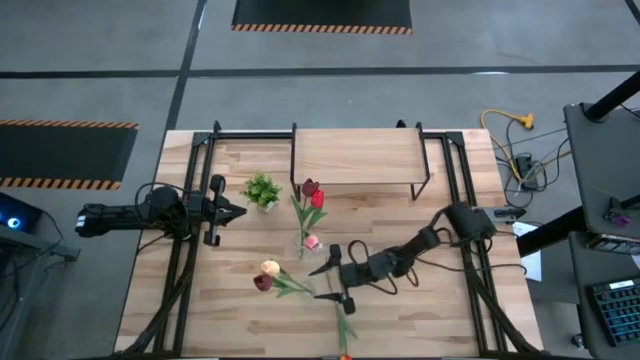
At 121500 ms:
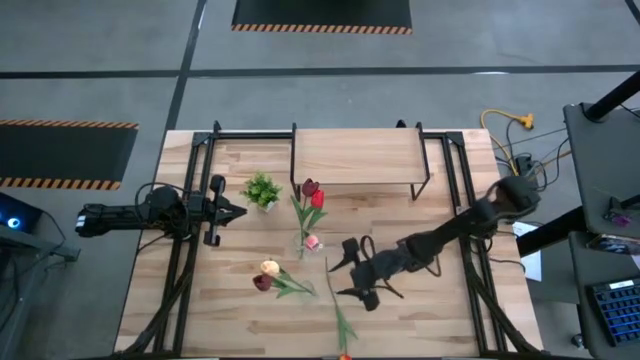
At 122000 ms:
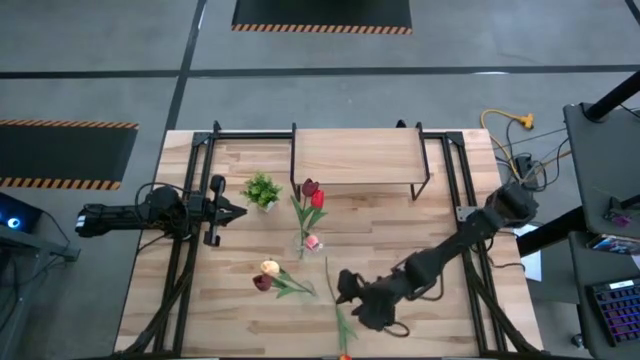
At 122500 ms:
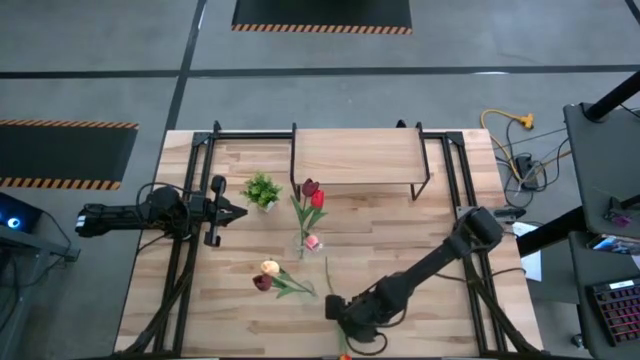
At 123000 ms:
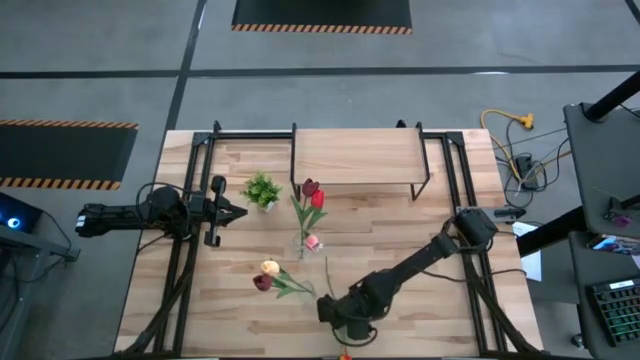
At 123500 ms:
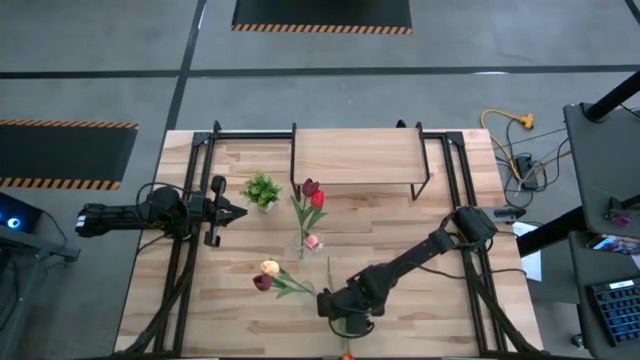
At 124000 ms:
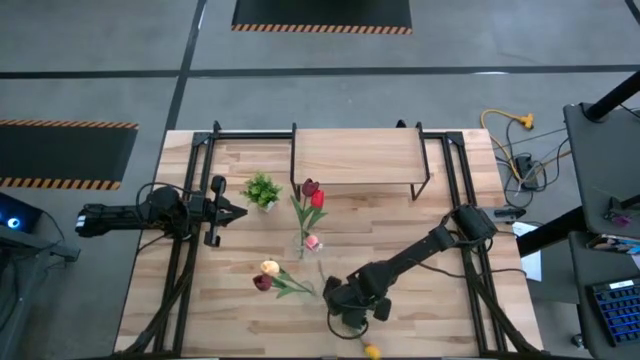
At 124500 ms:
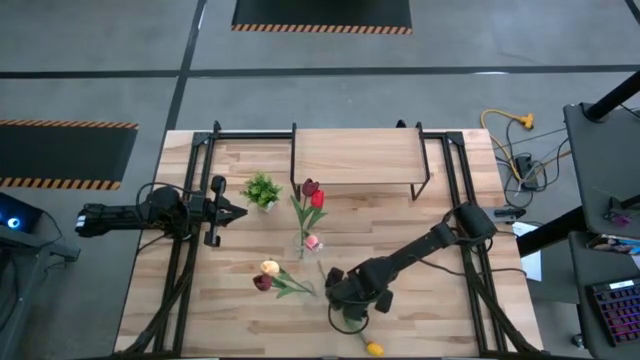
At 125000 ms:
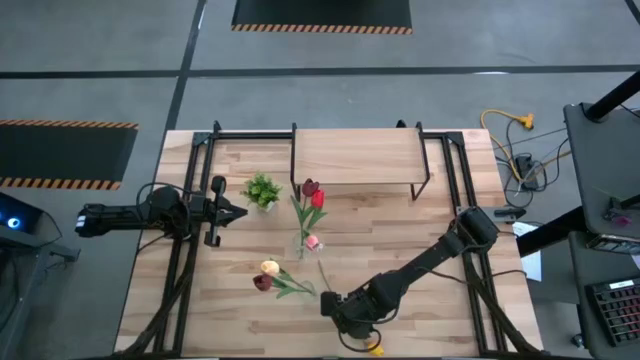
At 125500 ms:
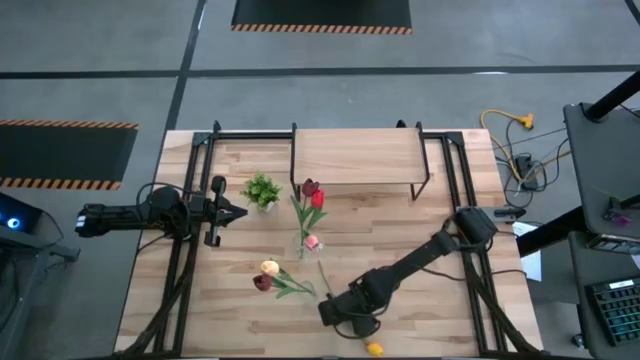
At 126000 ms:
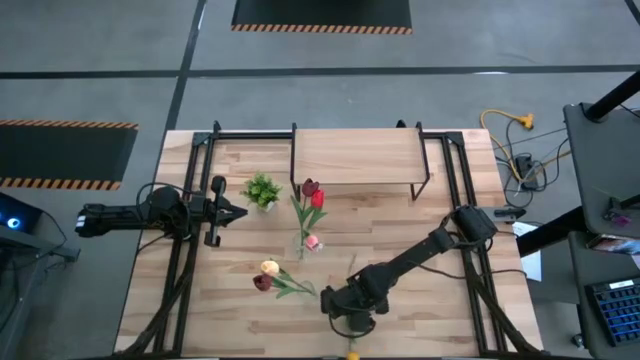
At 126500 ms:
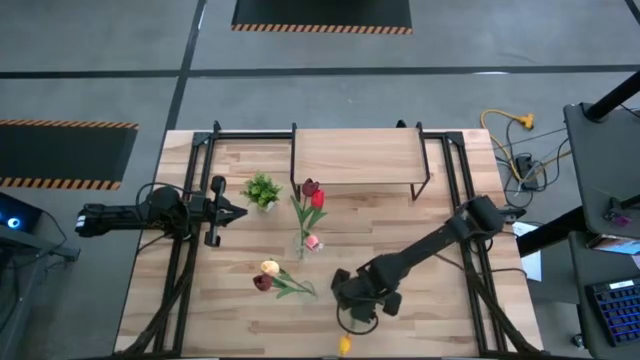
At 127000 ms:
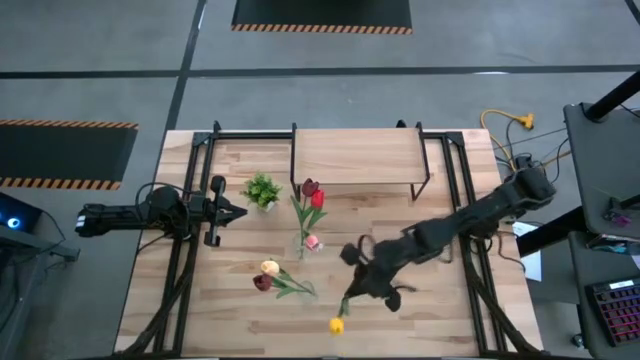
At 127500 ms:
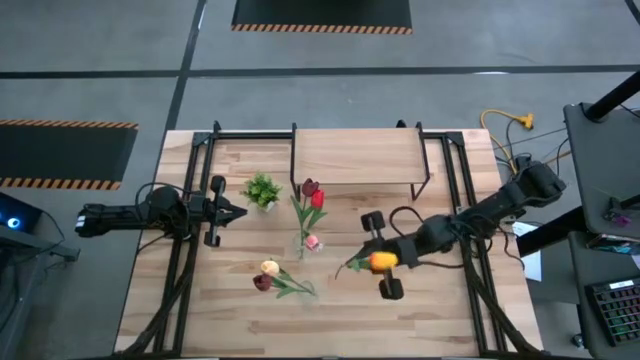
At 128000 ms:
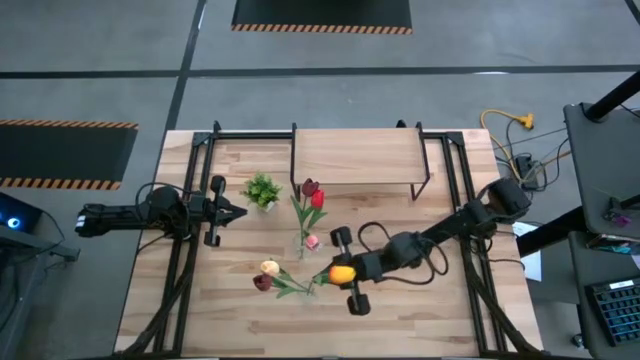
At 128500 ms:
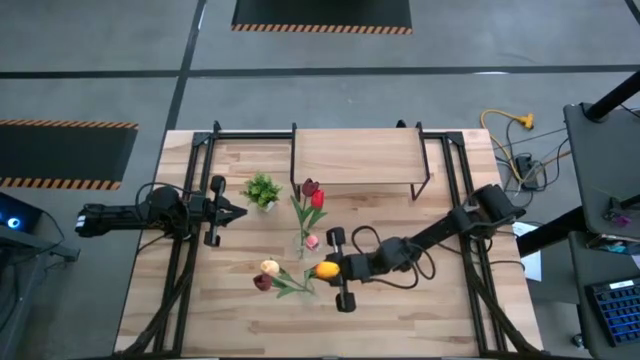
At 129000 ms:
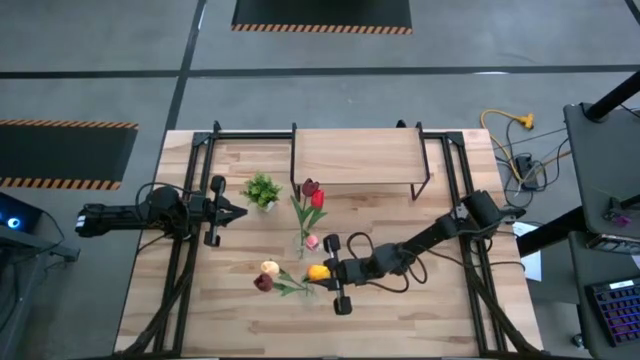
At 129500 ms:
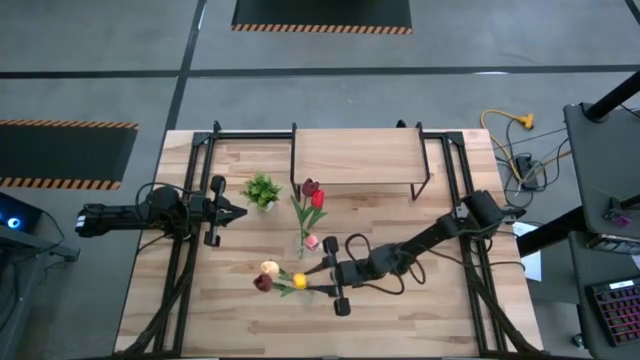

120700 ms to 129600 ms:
Task: Pick and place flowers into a vace then onto a shelf
Put the yellow tulip into the bottom transparent vase

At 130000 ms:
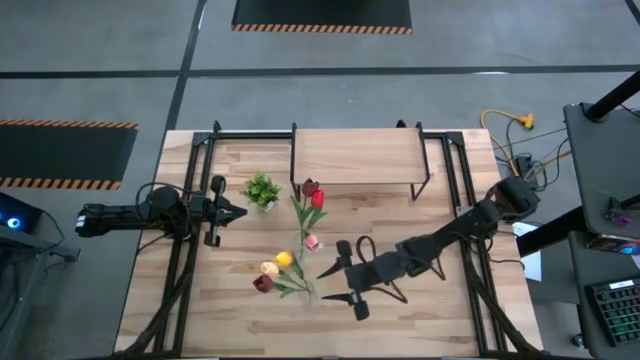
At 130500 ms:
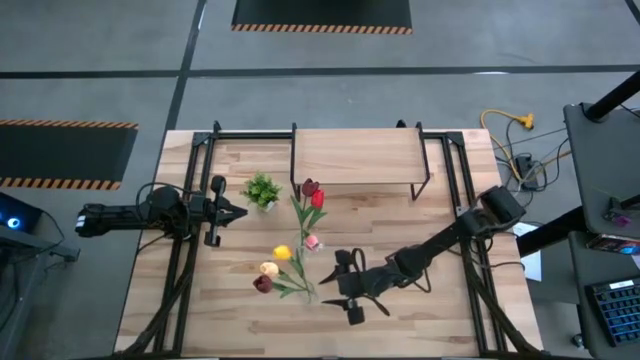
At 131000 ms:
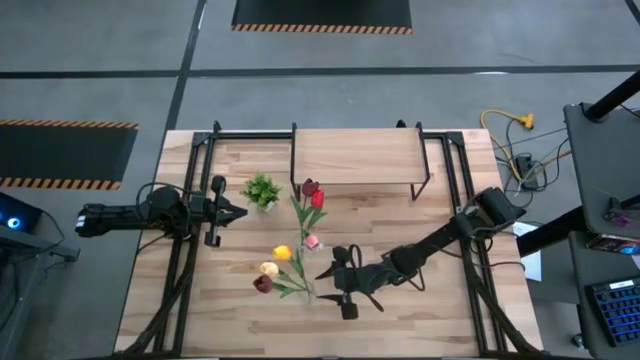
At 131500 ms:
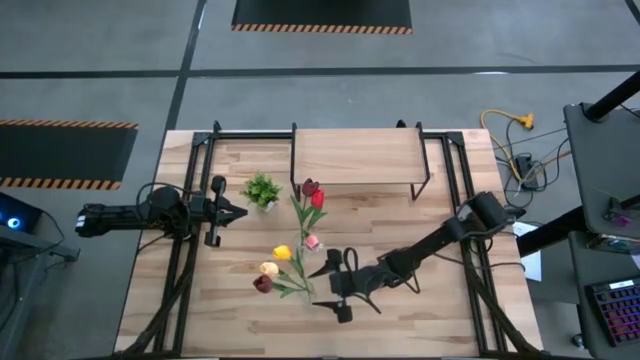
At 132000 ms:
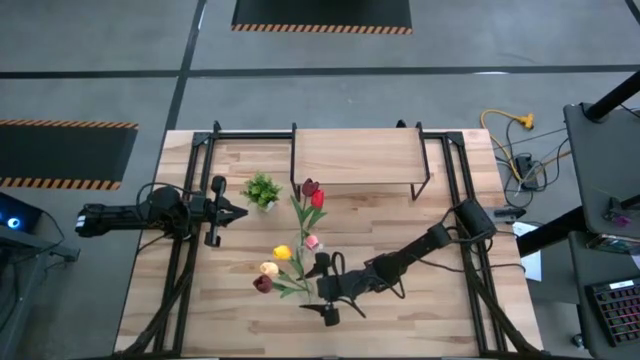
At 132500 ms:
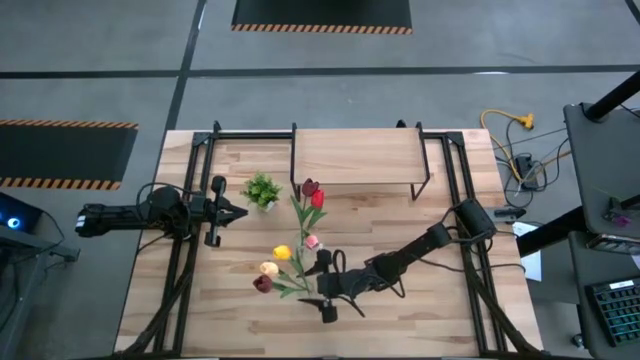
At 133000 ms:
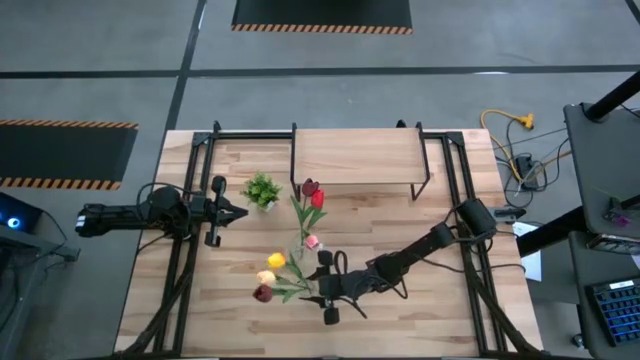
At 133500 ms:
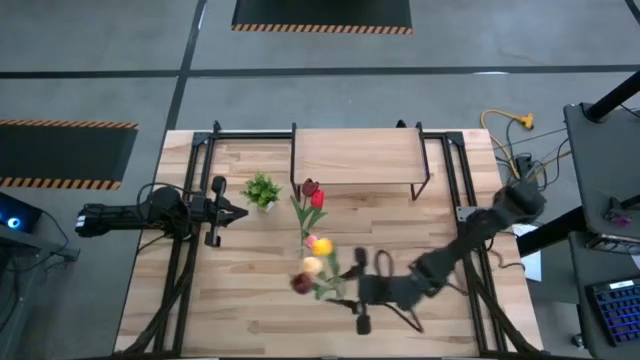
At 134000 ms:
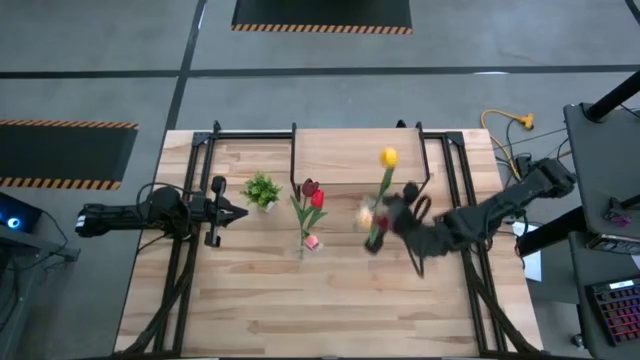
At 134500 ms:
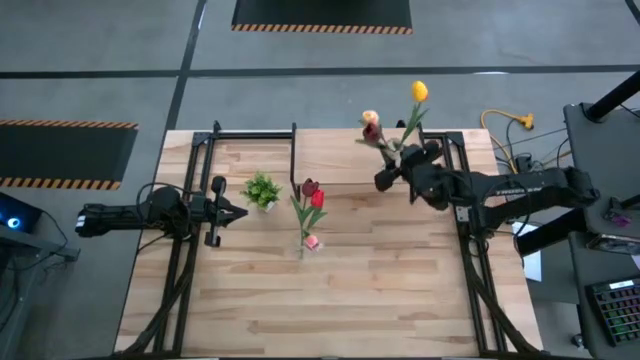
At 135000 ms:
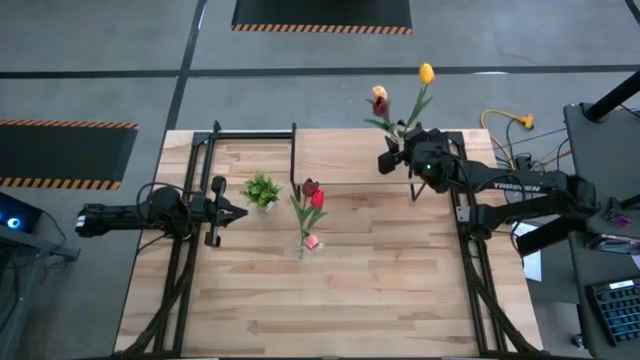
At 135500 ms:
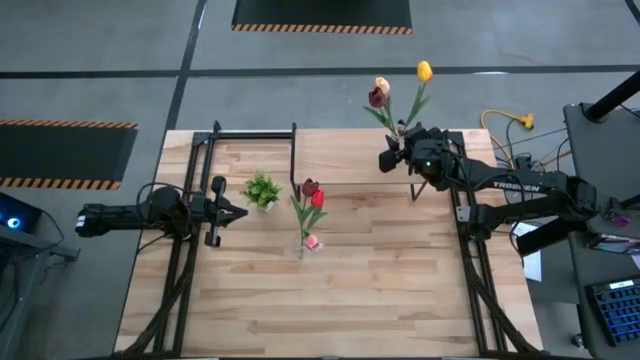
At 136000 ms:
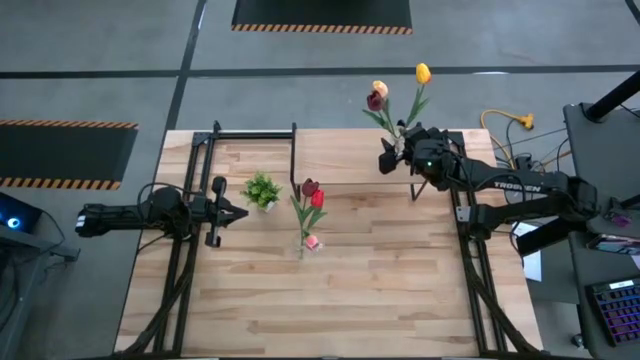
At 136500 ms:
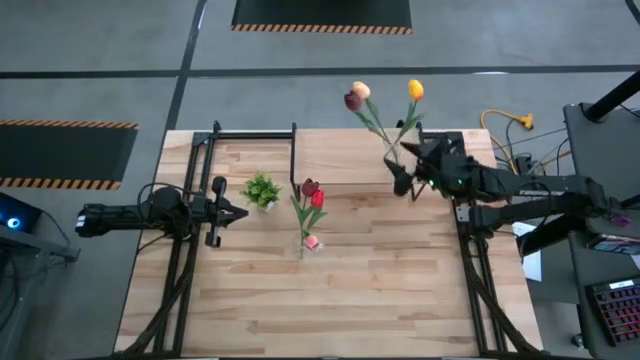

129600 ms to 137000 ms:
Put the bottom transparent vase on the shelf

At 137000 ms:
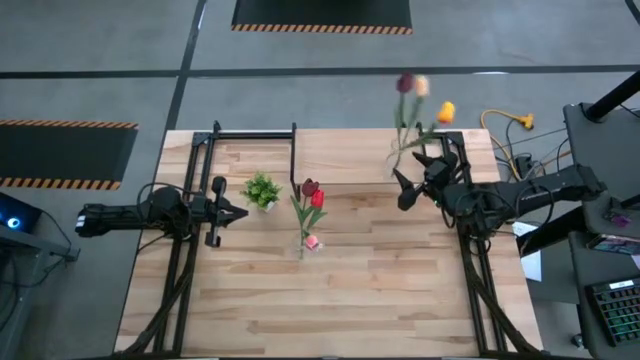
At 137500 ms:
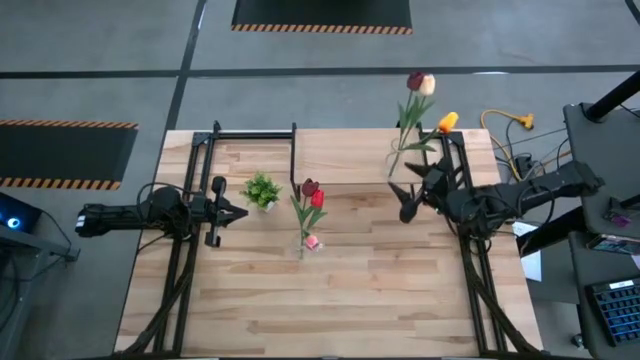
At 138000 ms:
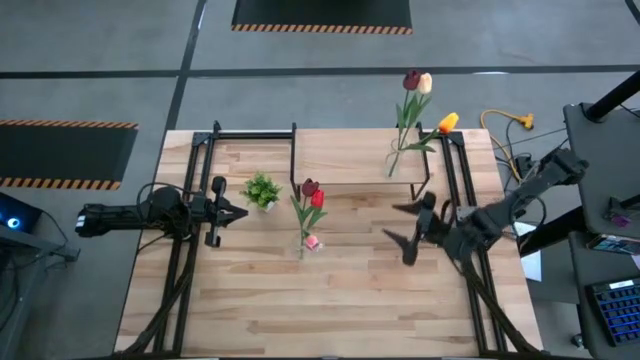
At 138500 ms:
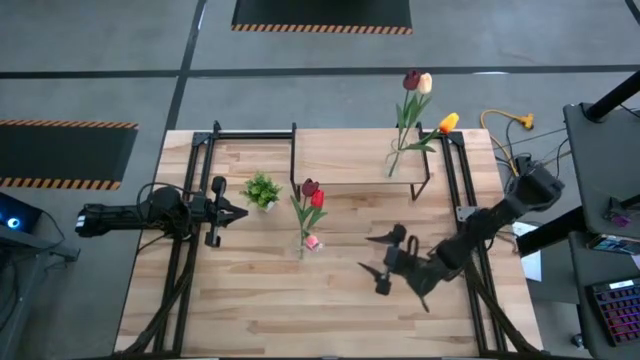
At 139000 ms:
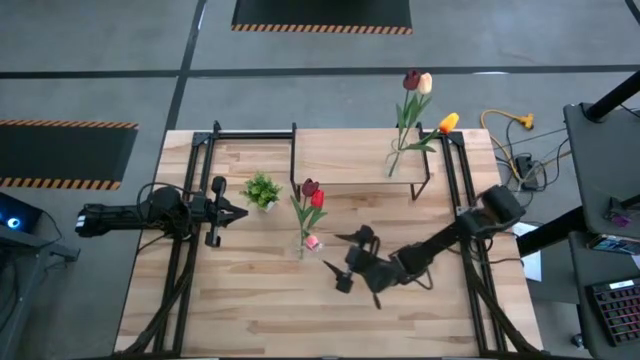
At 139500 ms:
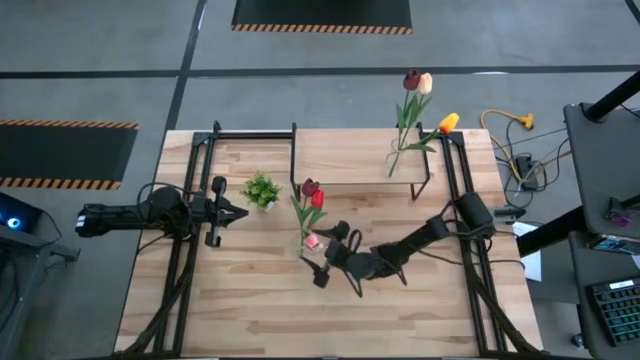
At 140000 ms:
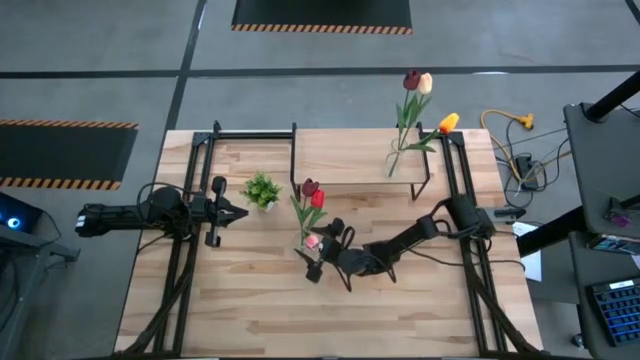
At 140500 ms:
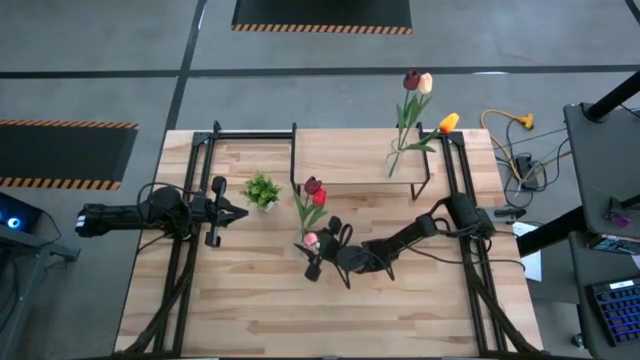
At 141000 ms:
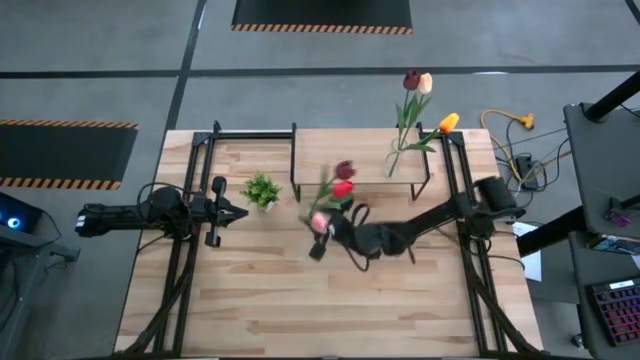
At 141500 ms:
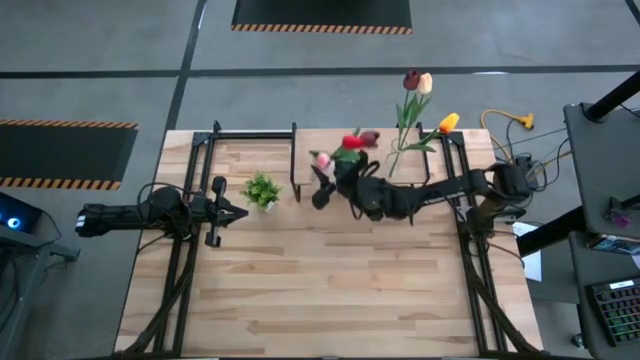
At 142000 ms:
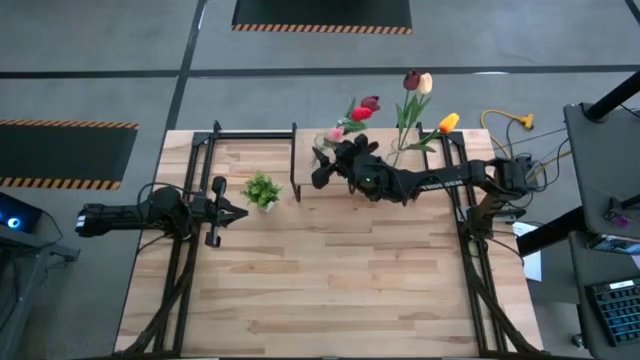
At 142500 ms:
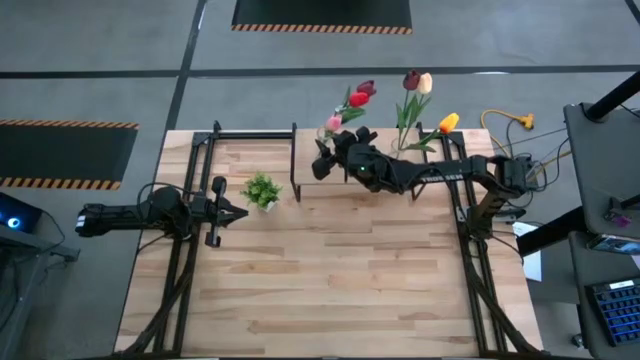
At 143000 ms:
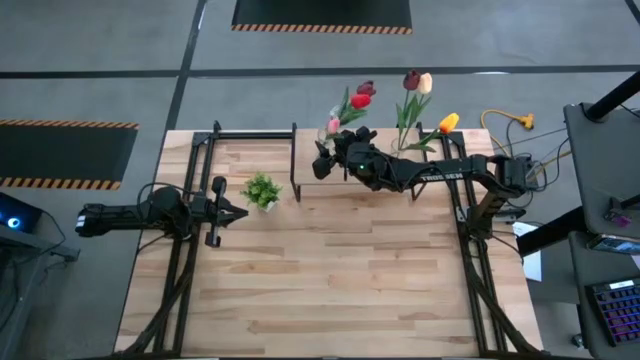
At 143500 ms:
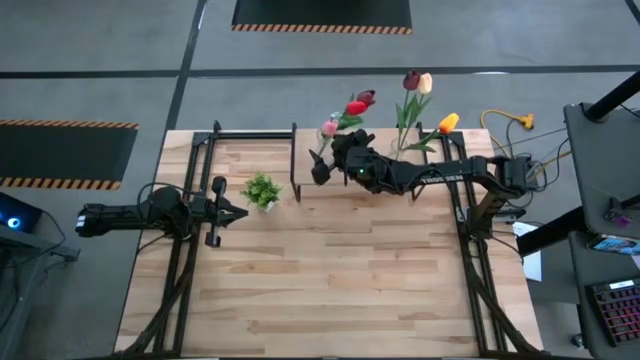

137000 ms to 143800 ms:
Put the transparent vase on the shelf
